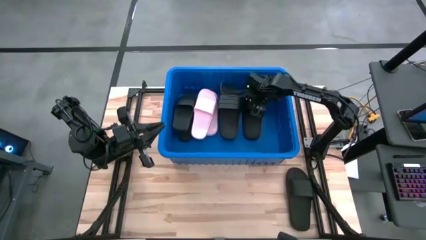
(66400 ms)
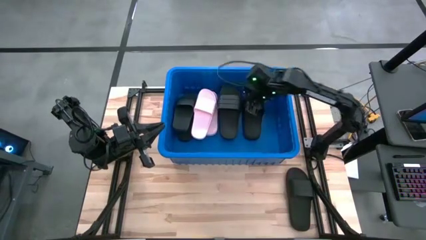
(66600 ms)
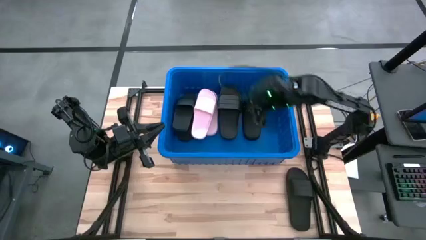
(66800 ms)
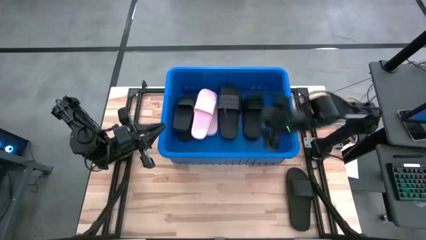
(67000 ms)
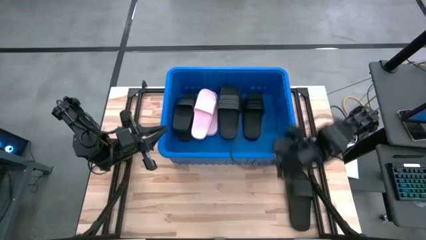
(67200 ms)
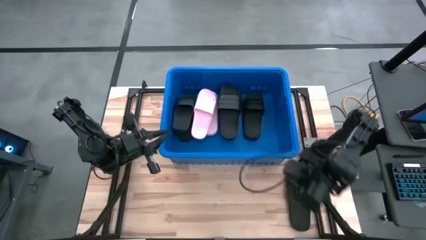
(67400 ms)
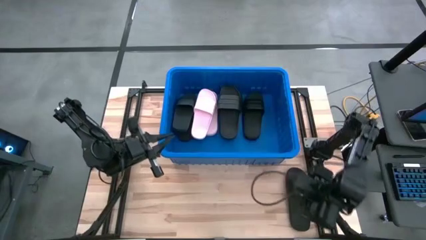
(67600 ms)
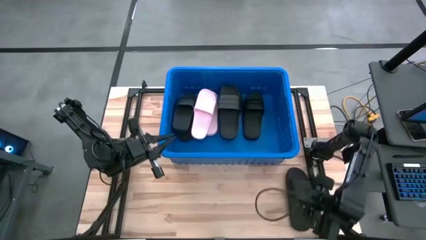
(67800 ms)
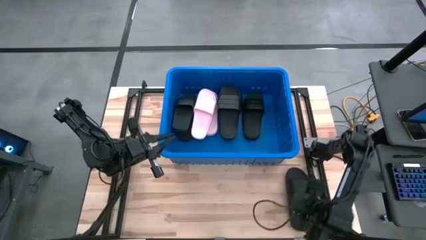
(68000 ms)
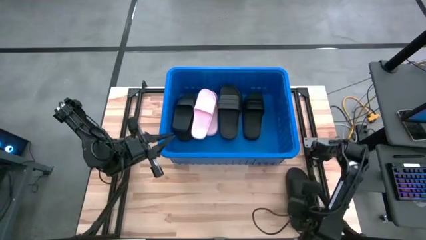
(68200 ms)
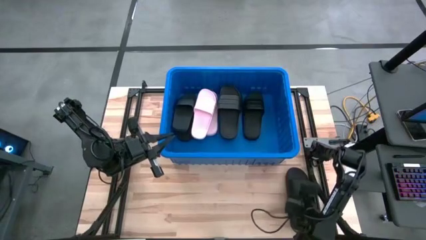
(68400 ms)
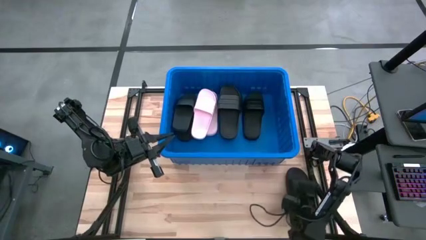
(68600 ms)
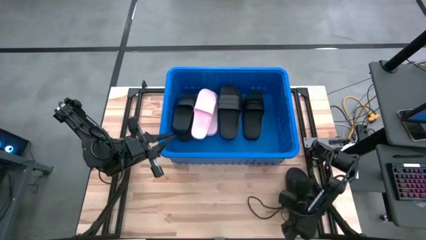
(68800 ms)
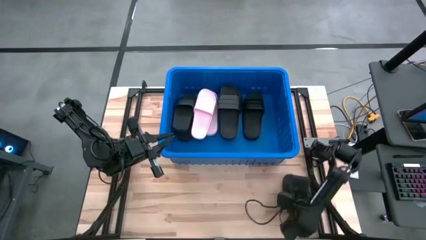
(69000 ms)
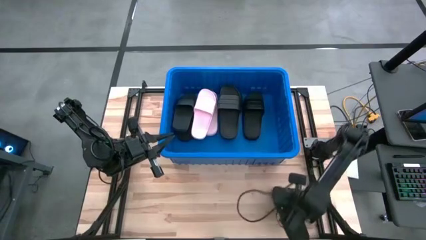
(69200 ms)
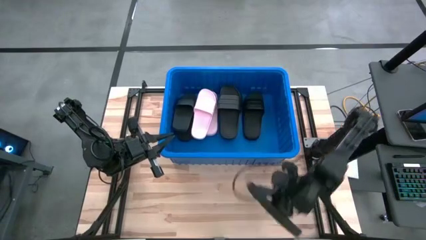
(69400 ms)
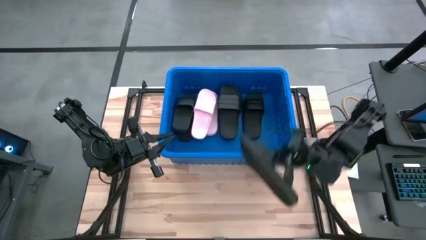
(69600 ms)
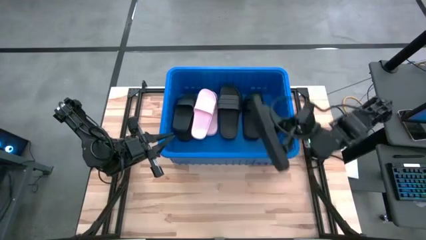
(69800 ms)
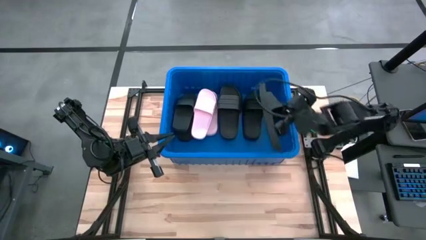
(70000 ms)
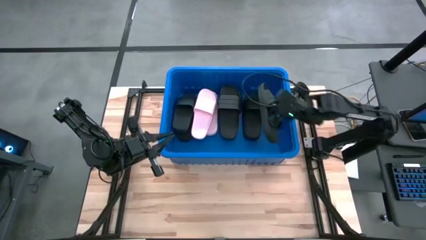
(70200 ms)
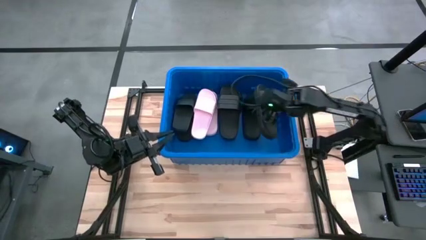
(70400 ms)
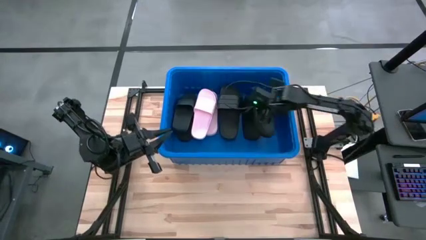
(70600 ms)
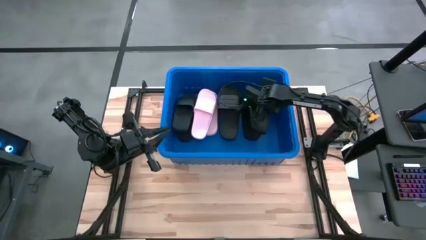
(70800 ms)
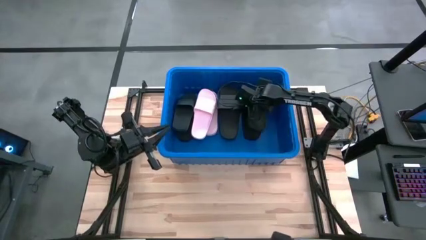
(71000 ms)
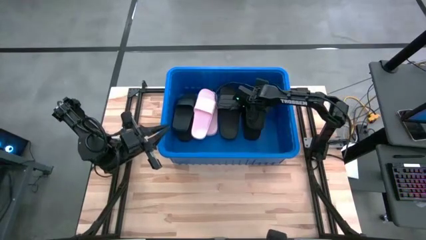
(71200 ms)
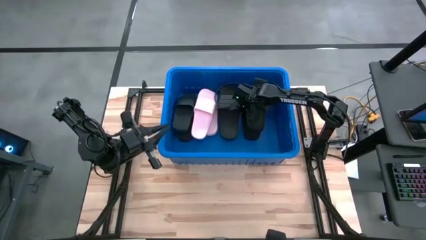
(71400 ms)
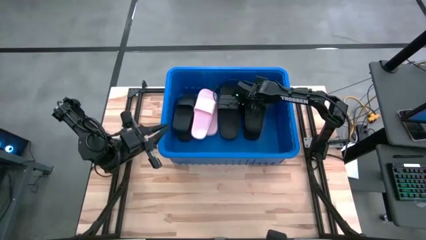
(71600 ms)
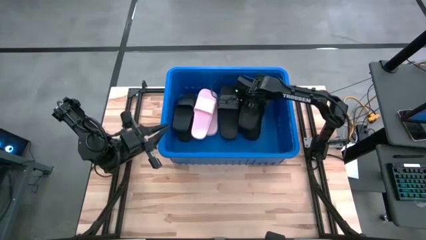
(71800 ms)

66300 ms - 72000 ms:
Task: Pick and place slides into bin
Put the black slide into the blue container

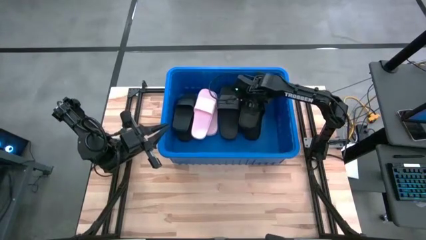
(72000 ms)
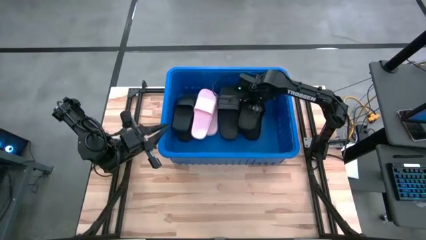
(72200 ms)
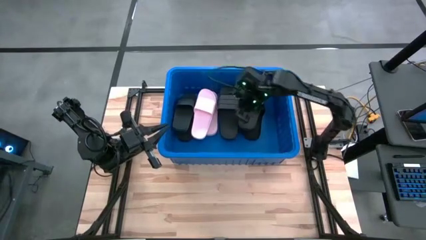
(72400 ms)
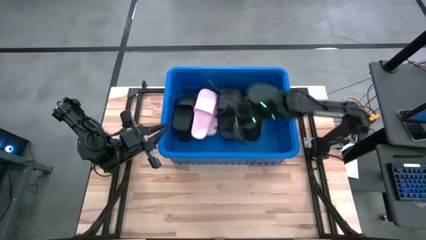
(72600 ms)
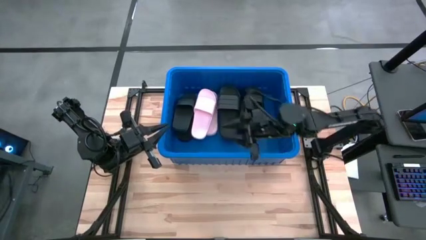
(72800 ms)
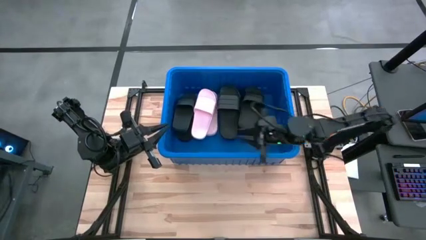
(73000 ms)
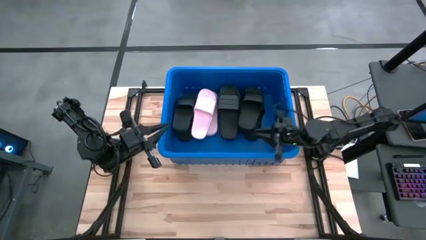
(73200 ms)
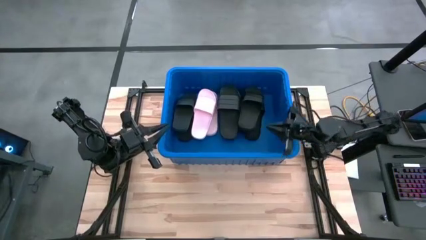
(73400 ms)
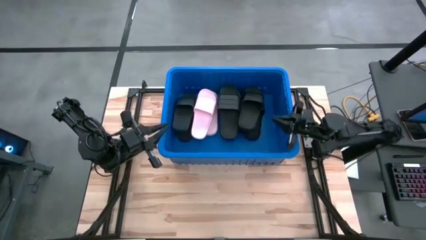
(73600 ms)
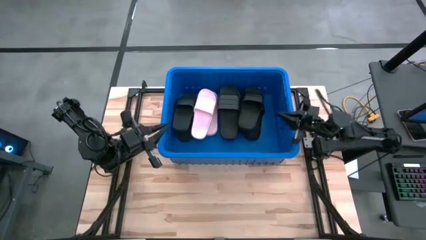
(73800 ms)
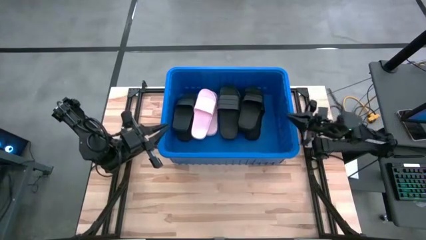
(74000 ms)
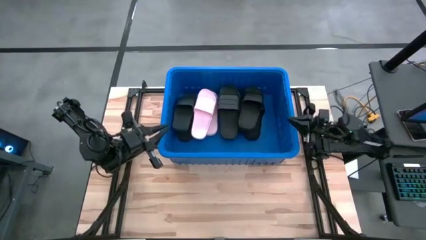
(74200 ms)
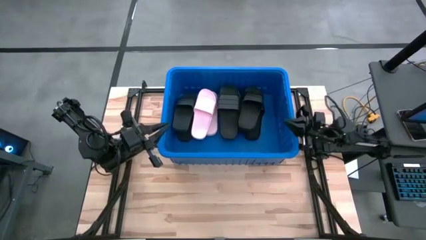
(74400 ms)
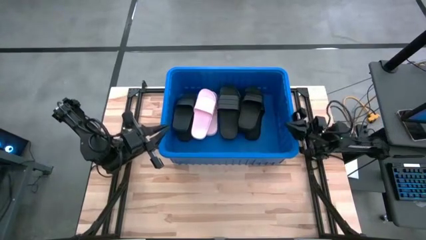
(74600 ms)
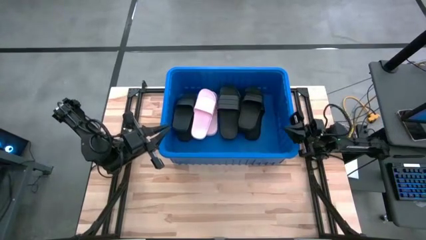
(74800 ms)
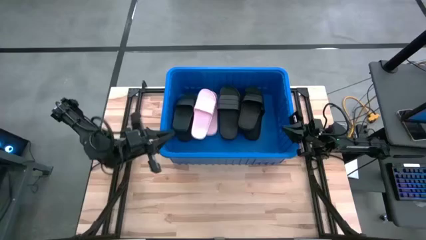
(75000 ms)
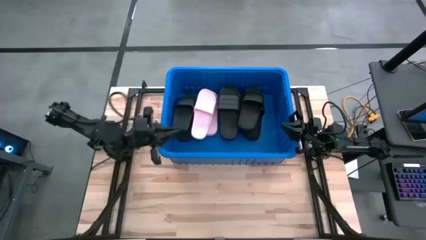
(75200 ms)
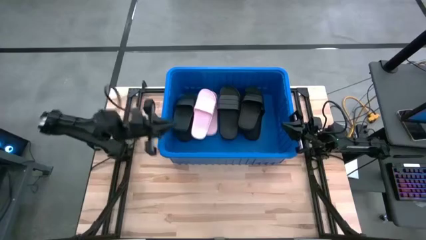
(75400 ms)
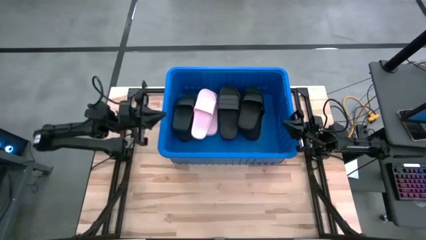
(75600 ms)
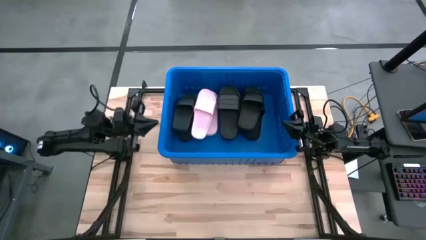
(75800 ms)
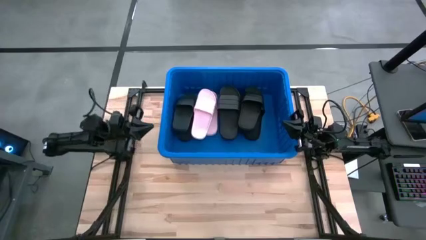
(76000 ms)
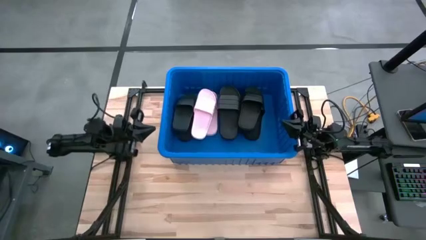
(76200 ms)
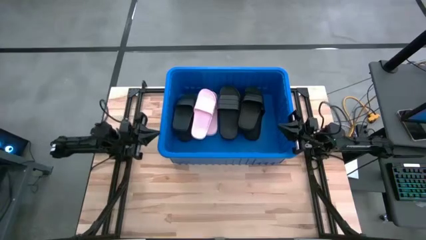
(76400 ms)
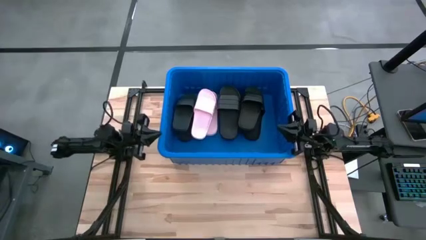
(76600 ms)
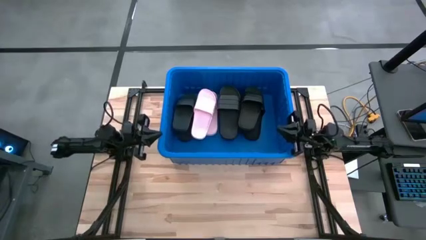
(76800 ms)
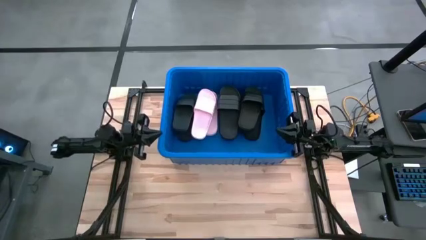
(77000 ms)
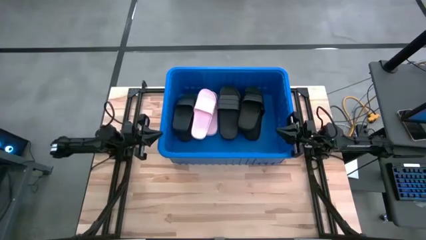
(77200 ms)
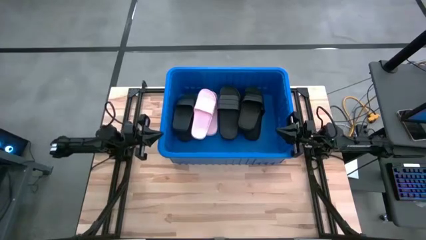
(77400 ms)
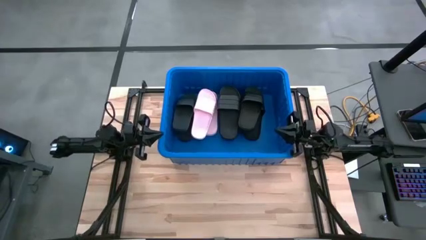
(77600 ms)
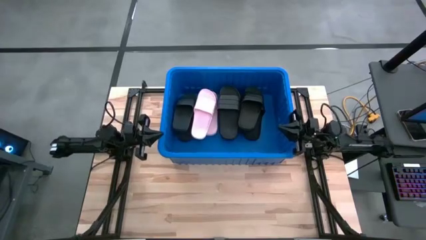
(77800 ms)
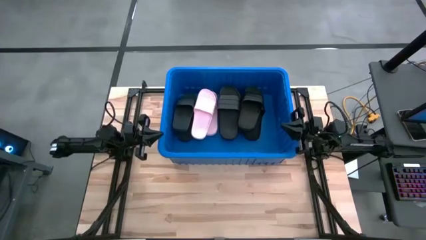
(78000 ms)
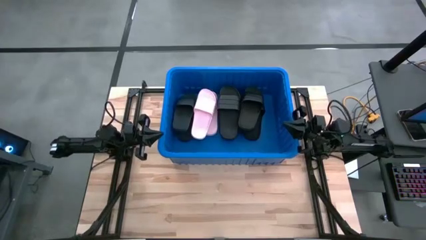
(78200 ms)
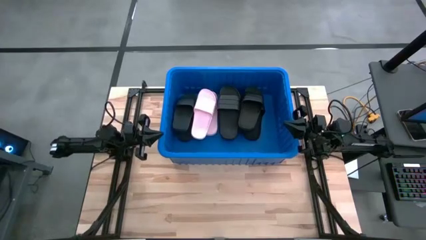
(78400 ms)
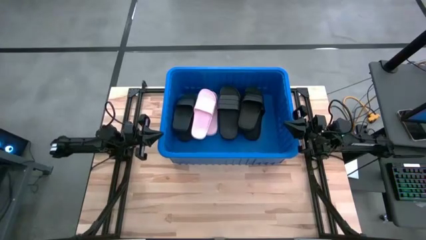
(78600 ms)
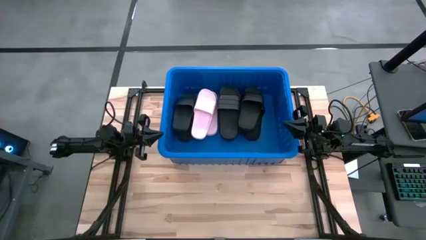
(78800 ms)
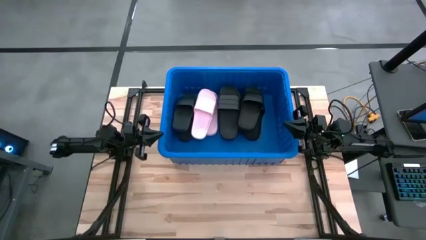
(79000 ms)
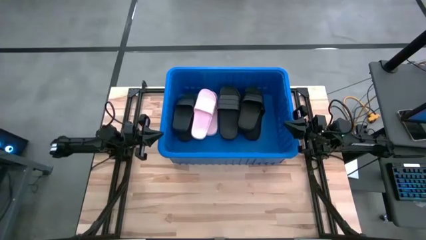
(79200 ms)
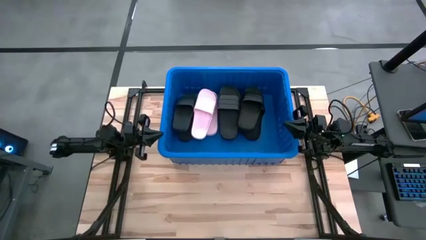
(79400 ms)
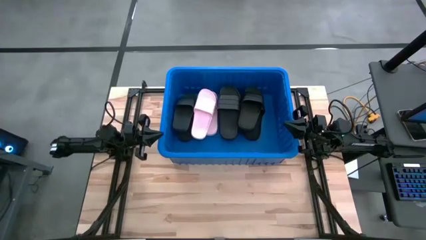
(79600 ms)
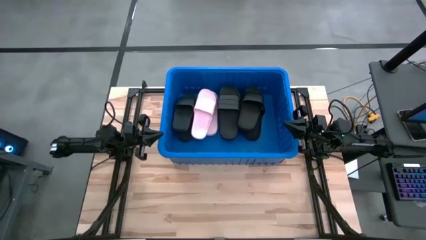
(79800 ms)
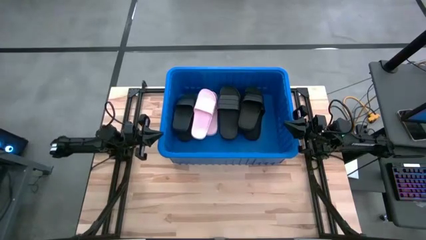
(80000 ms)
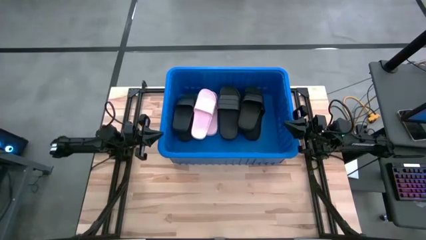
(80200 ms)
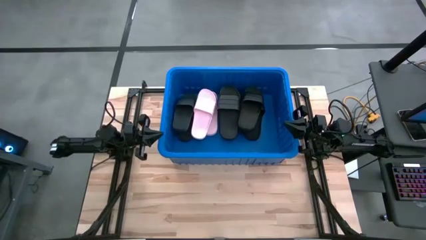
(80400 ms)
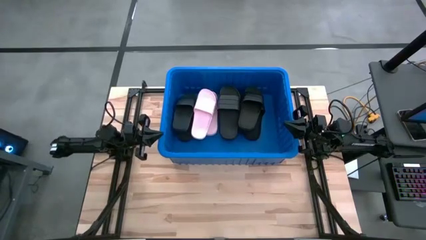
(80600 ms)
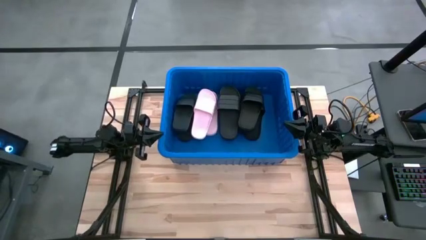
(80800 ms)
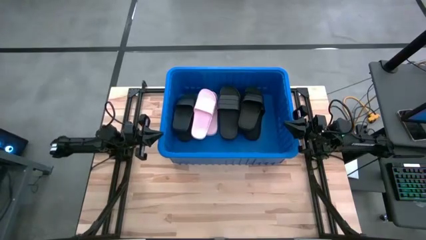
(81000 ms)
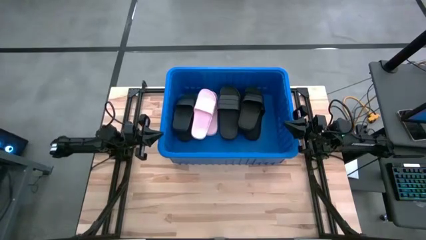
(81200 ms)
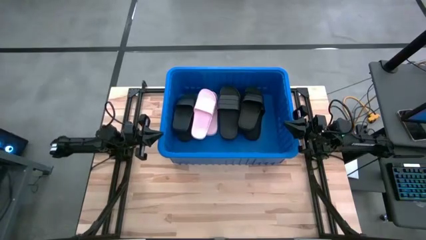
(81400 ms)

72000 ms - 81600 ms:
Return to Home Position
